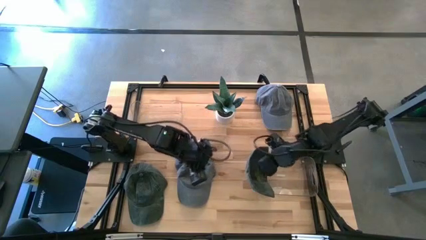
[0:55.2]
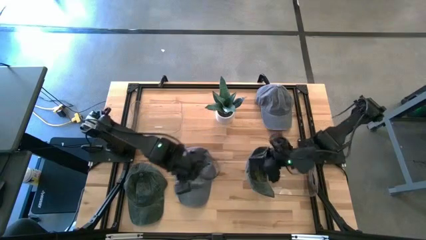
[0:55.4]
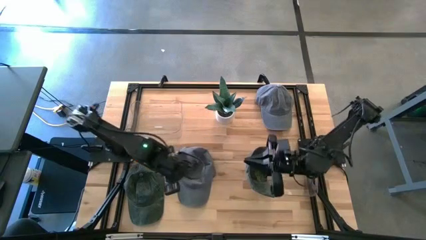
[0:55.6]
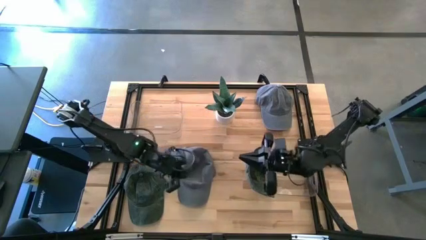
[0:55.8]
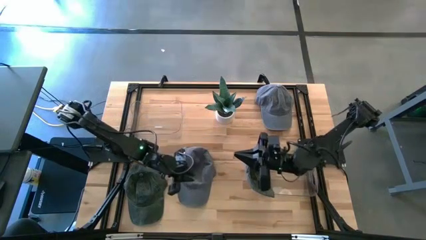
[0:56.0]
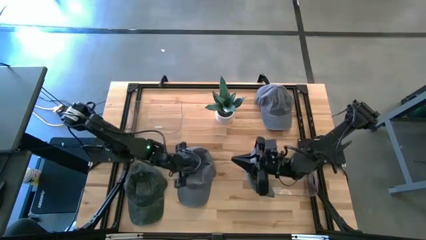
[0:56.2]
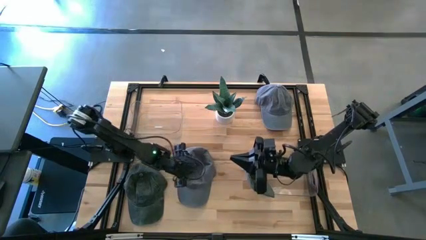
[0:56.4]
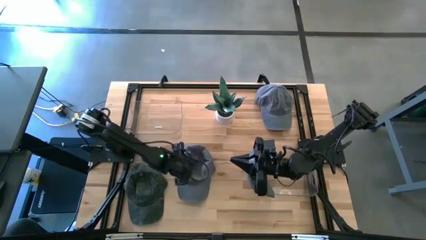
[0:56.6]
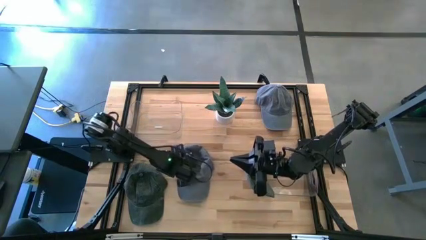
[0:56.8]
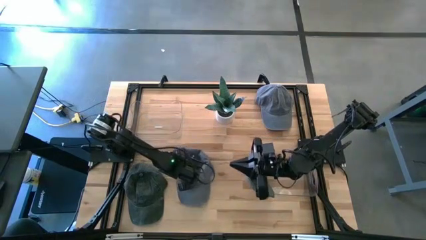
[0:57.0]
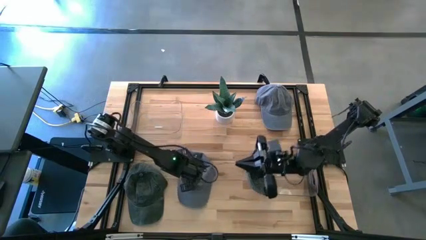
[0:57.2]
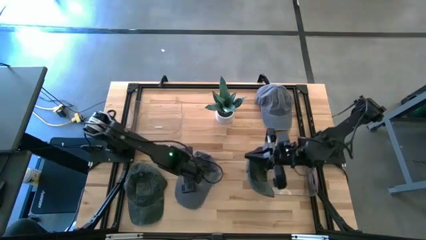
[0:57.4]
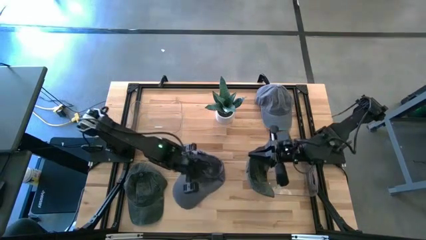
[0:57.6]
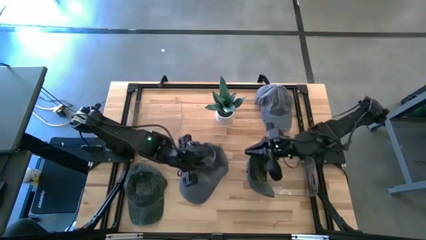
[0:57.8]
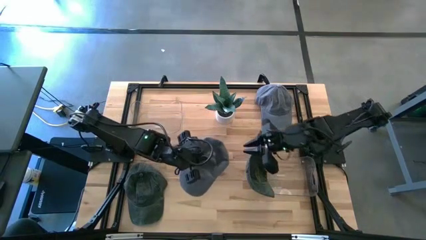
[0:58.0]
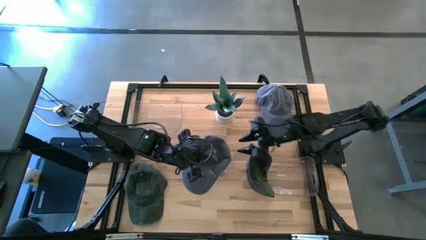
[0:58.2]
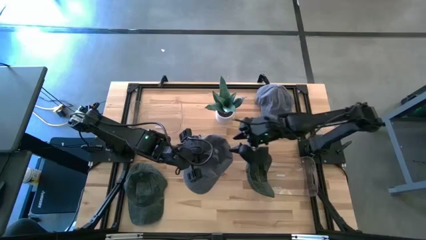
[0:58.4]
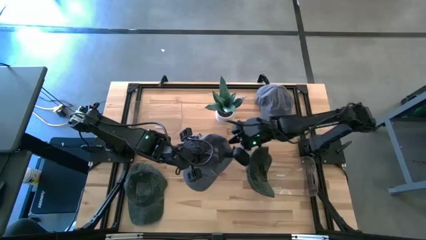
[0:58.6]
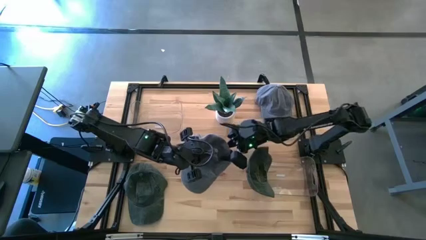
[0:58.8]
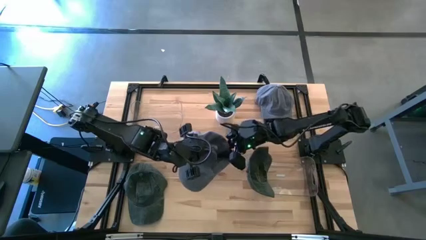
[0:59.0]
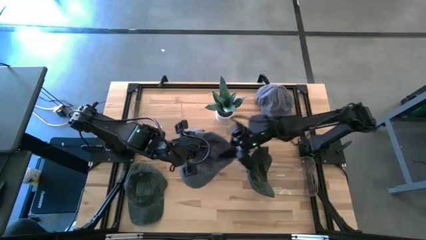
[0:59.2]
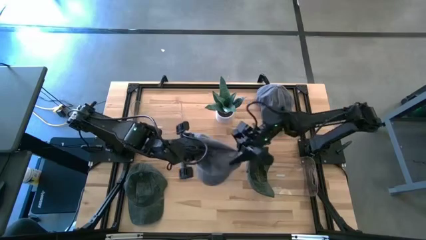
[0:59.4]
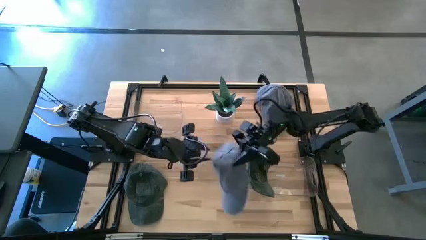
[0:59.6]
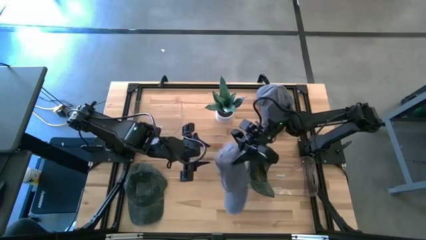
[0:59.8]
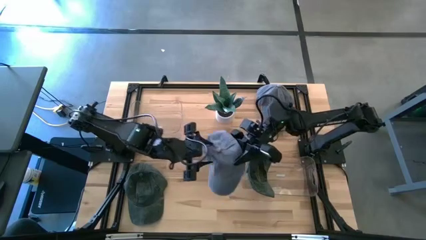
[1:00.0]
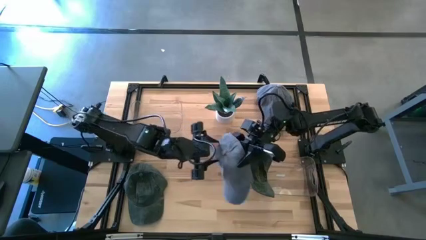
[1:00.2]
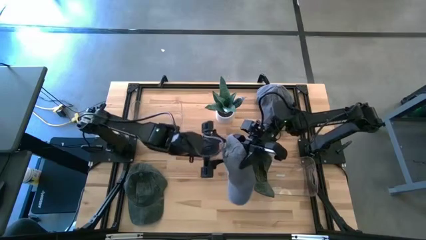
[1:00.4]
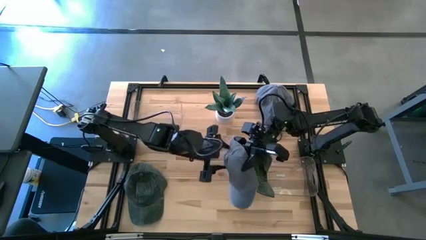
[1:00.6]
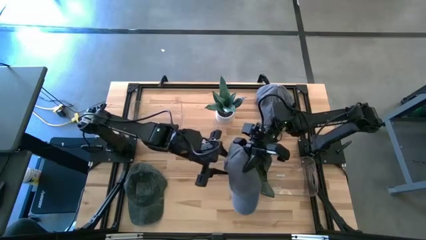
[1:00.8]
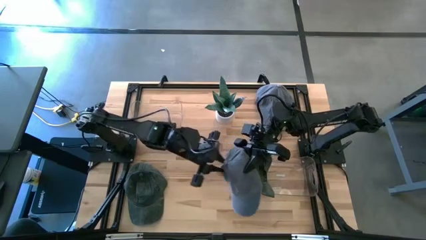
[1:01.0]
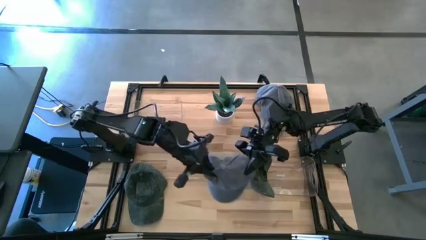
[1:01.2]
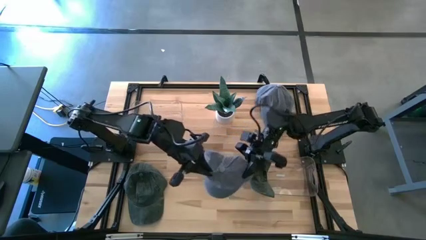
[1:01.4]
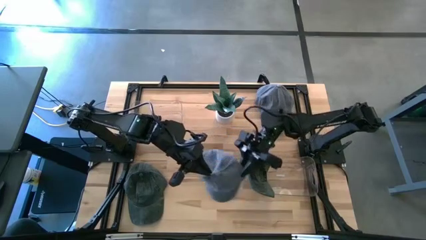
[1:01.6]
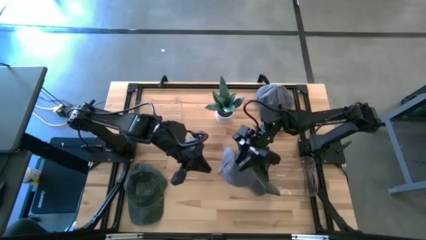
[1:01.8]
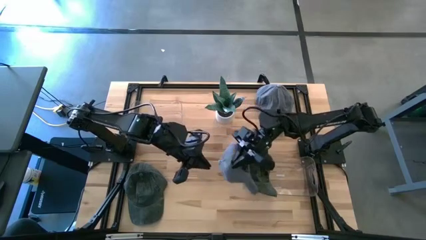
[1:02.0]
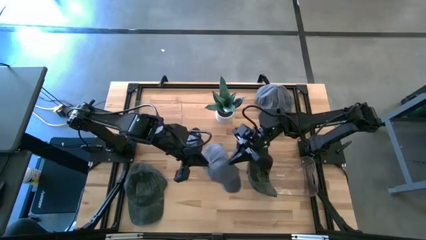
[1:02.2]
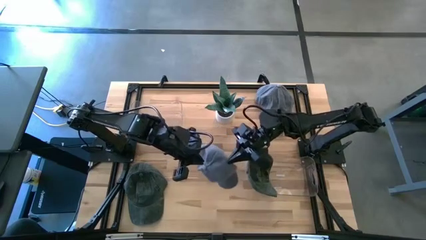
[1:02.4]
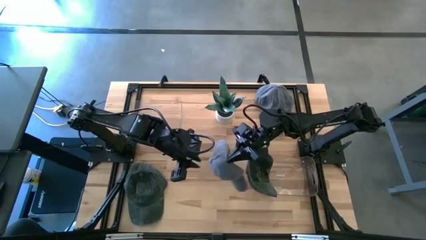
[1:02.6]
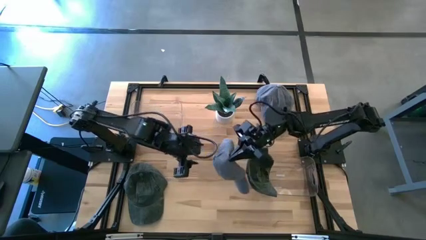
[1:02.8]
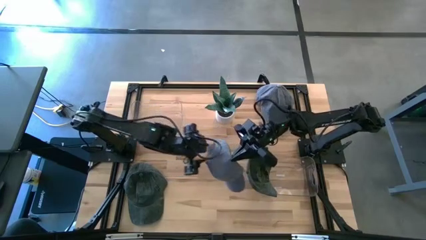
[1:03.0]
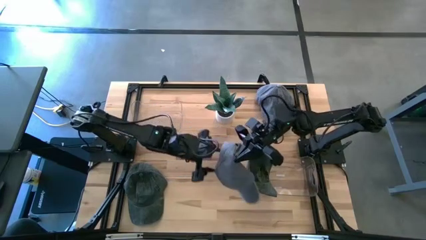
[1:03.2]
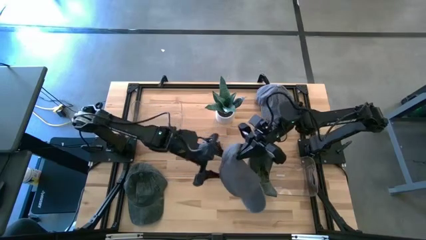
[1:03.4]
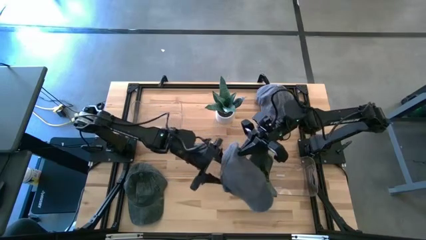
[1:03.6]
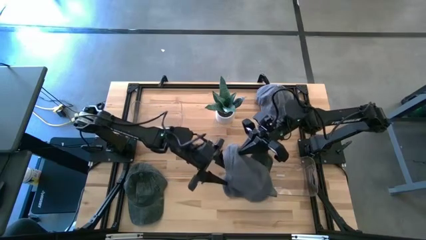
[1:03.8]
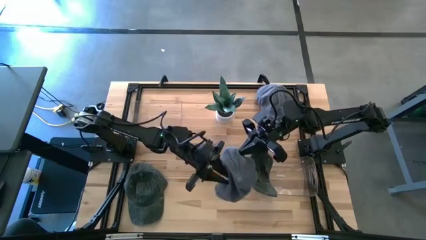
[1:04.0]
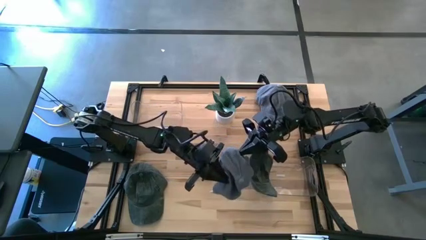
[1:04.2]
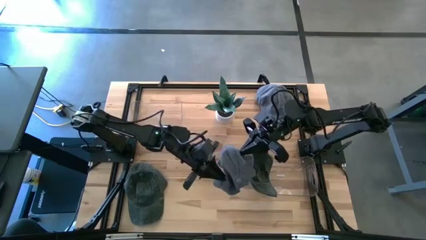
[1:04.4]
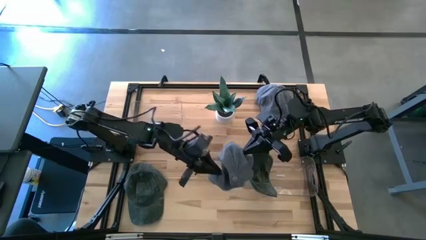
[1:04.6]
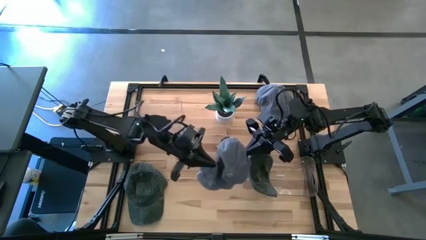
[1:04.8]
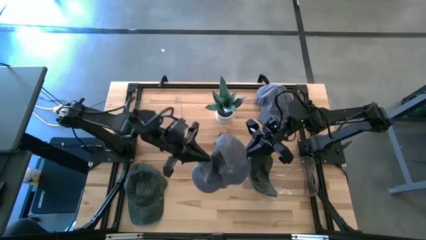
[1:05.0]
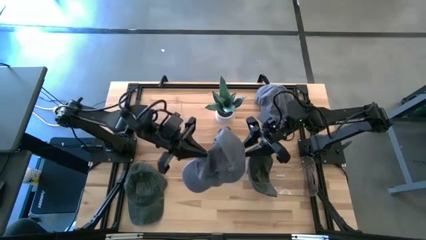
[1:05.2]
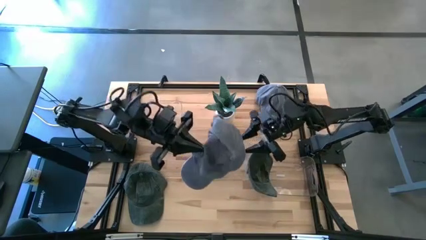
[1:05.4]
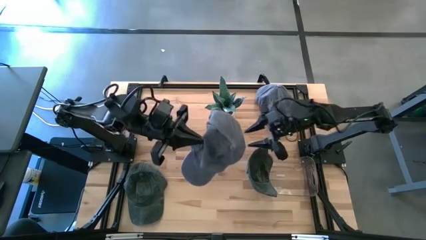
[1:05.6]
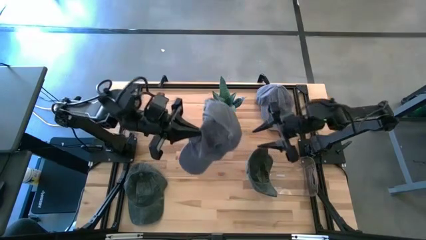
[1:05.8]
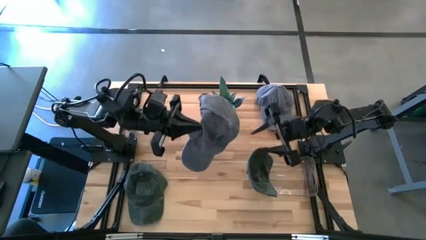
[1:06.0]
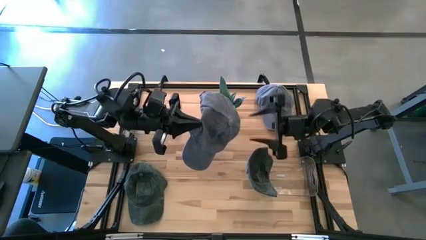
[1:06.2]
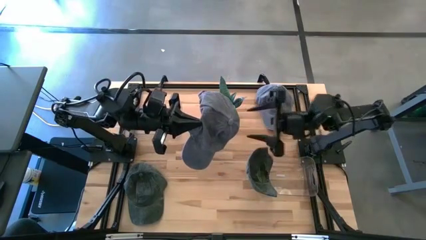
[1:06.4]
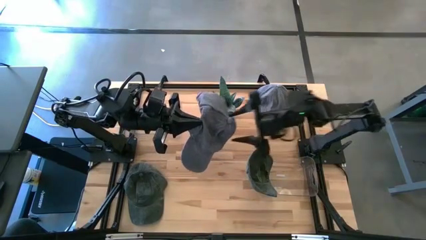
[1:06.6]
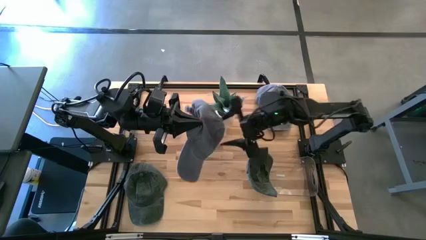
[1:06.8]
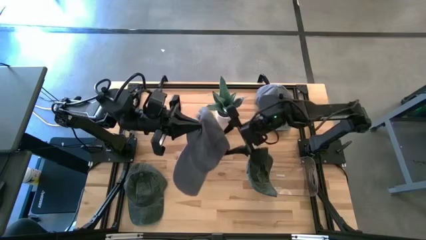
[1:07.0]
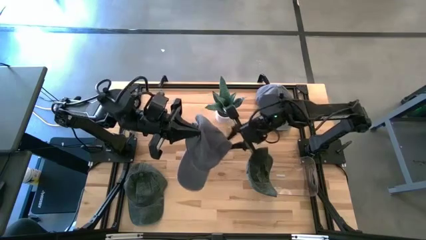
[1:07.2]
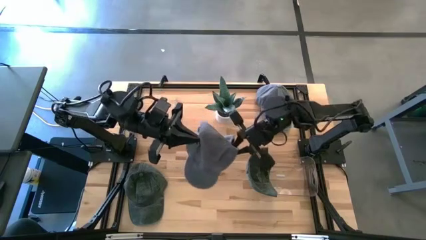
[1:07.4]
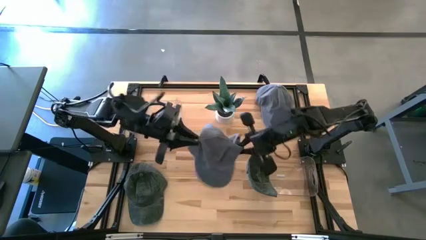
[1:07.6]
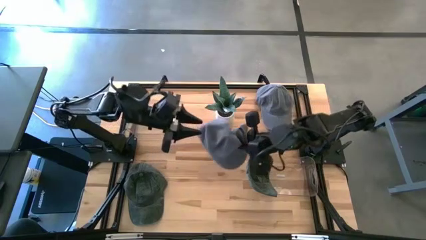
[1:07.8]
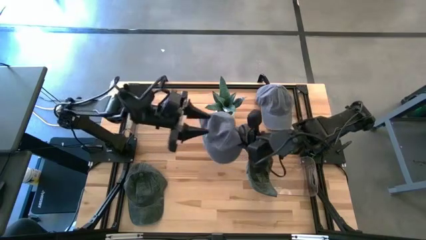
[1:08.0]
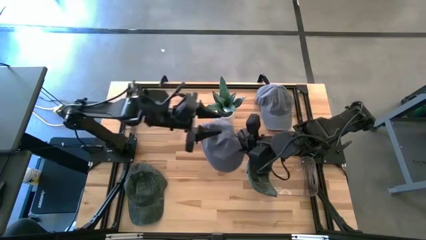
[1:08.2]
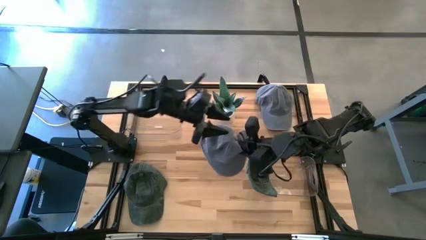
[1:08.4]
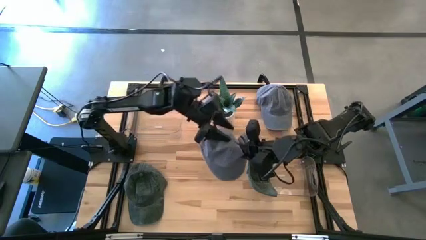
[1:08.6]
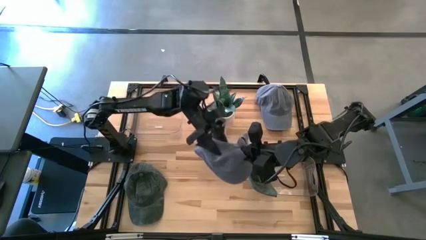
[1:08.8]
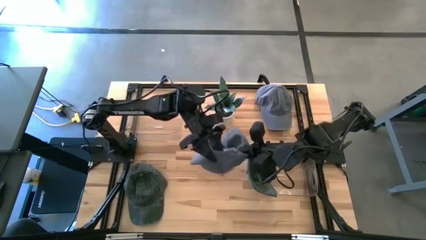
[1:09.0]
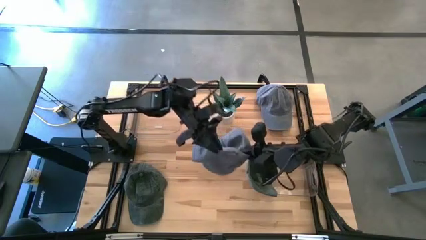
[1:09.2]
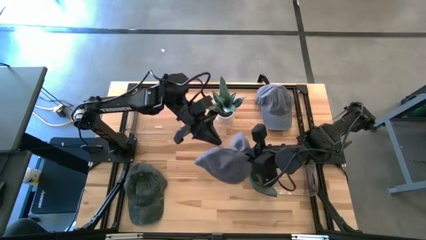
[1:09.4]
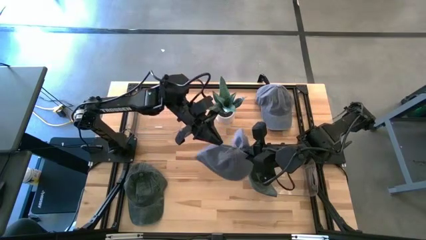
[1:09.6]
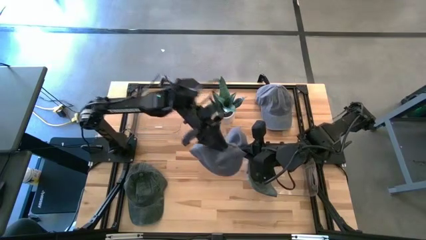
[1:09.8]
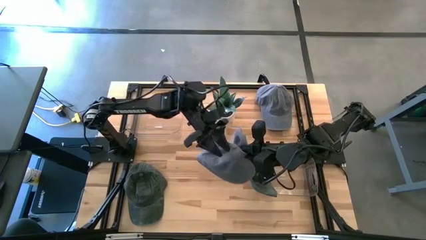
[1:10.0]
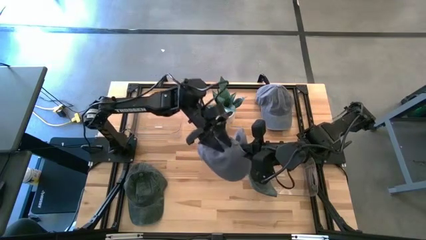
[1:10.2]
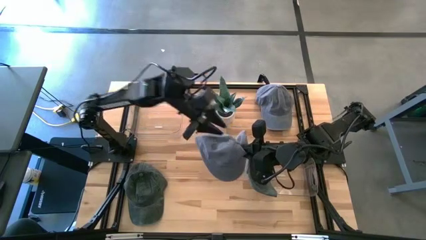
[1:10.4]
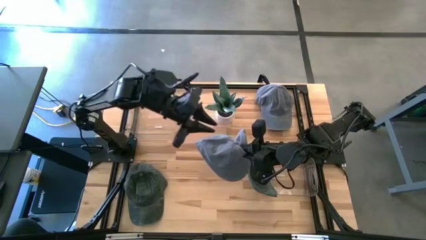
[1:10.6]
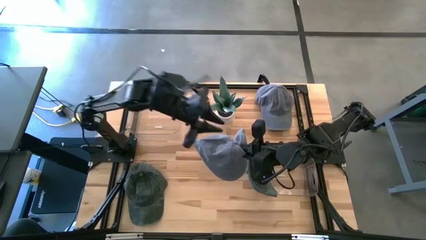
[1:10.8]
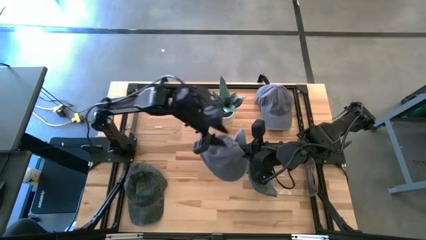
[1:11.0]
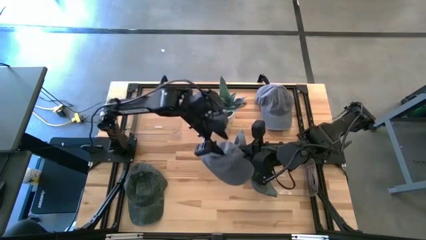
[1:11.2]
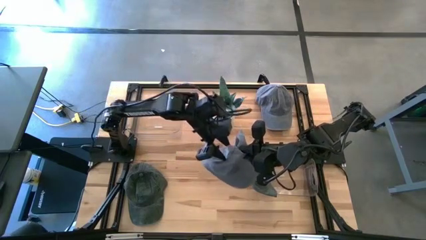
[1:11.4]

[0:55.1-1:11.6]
Task: Pick & Place hat
Put the left gray cap into the left transparent bin
